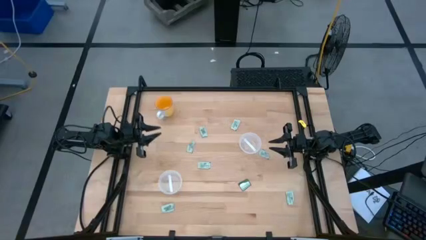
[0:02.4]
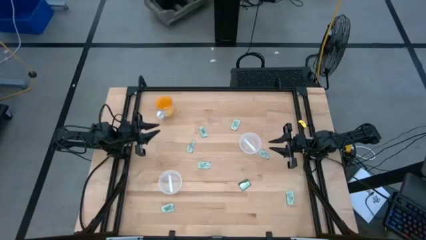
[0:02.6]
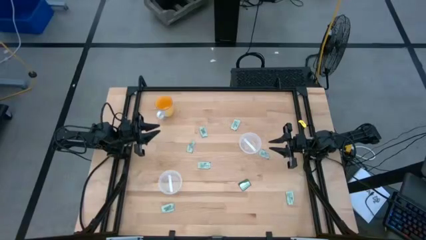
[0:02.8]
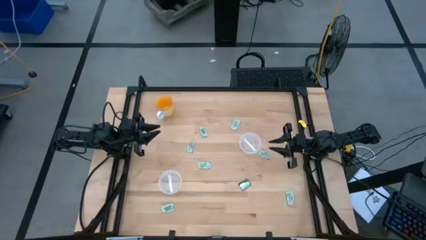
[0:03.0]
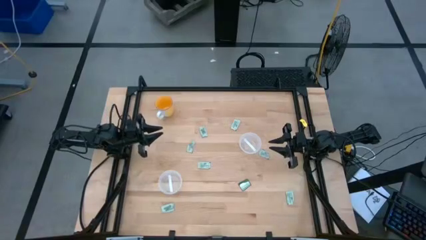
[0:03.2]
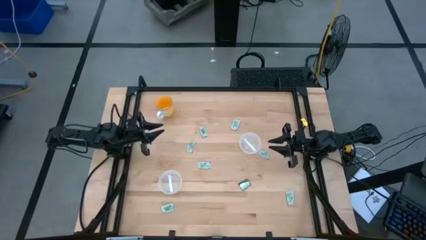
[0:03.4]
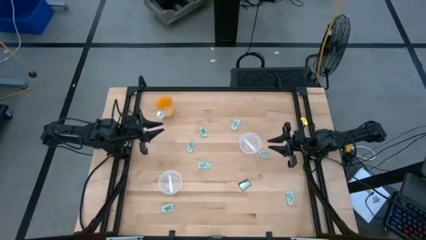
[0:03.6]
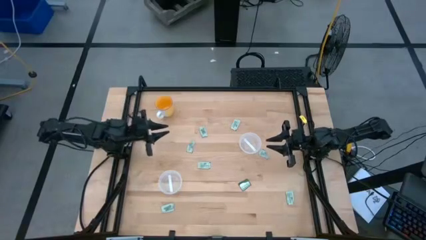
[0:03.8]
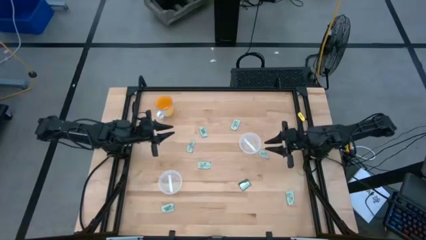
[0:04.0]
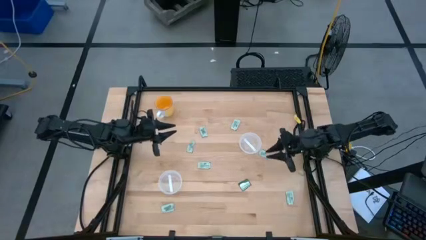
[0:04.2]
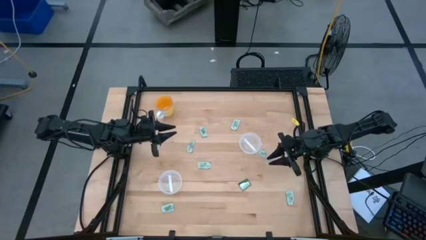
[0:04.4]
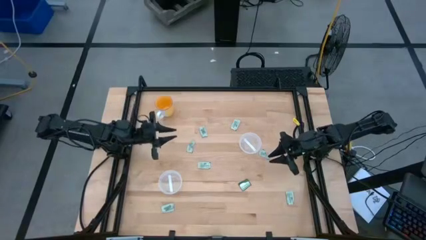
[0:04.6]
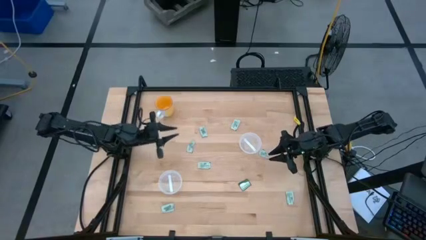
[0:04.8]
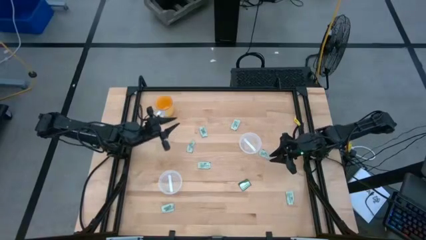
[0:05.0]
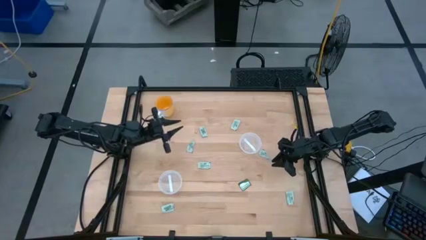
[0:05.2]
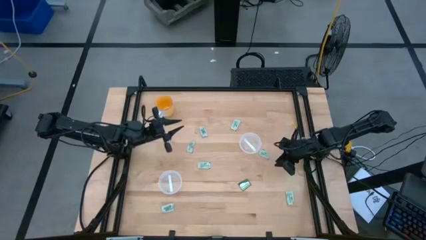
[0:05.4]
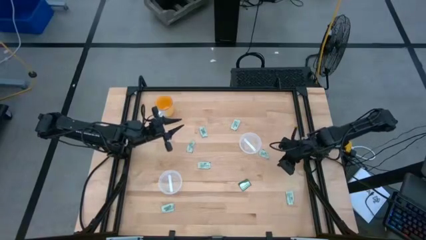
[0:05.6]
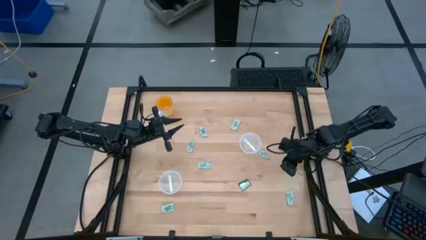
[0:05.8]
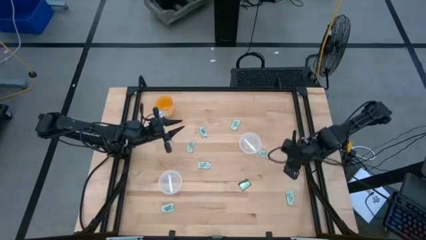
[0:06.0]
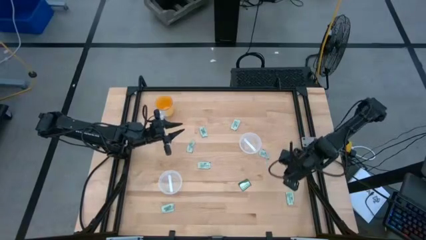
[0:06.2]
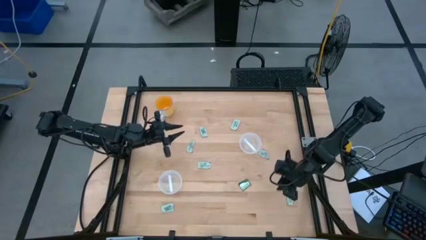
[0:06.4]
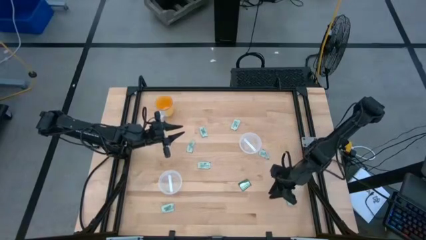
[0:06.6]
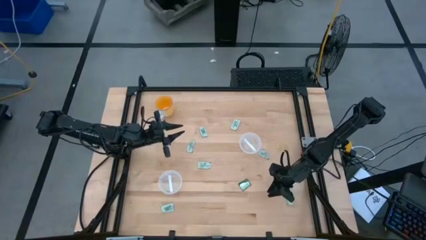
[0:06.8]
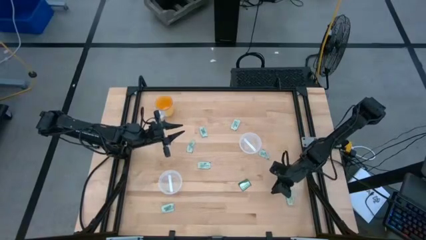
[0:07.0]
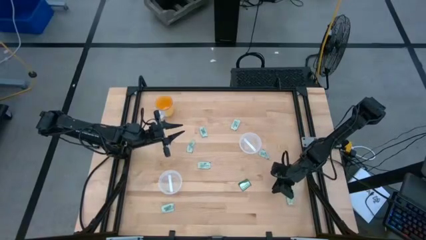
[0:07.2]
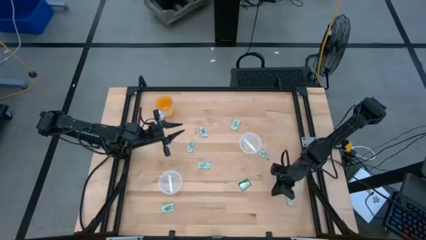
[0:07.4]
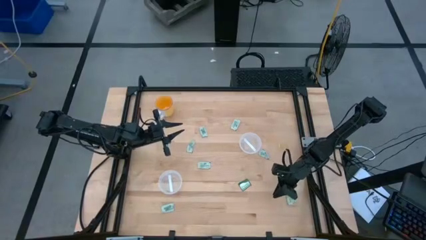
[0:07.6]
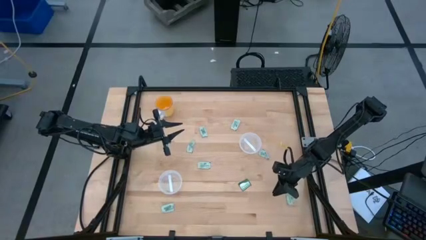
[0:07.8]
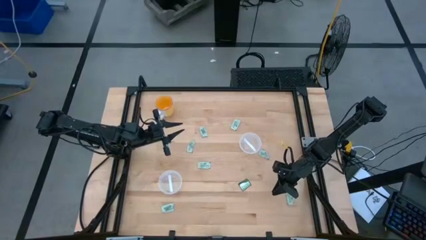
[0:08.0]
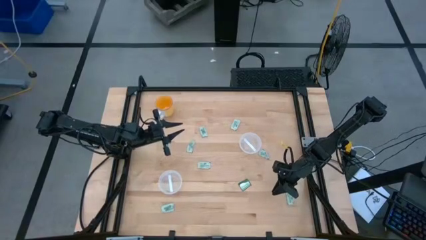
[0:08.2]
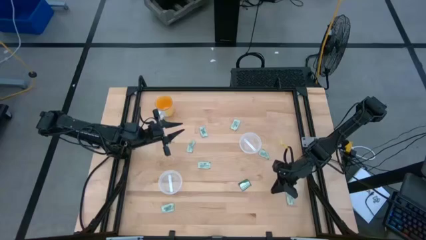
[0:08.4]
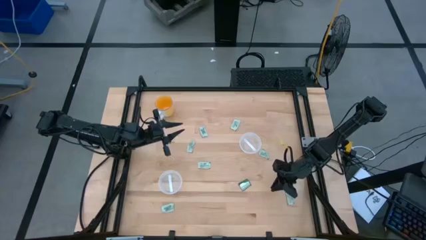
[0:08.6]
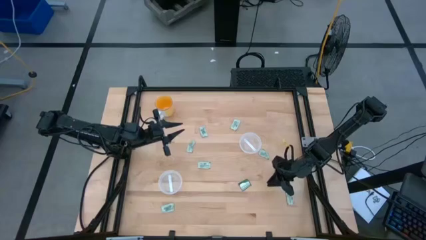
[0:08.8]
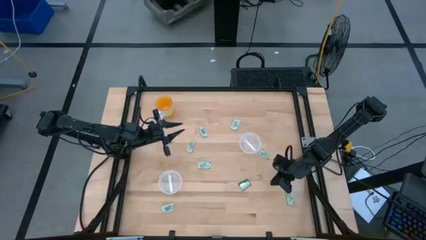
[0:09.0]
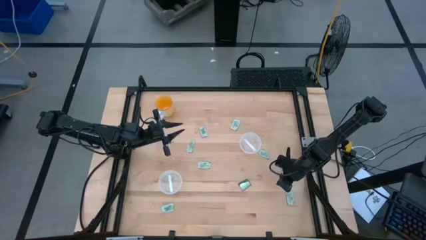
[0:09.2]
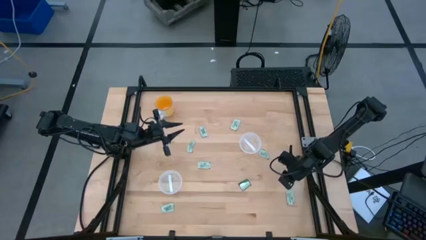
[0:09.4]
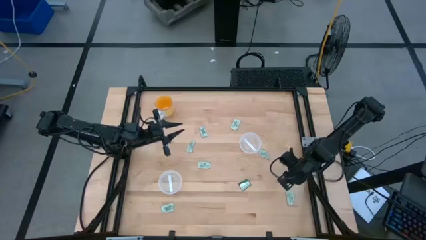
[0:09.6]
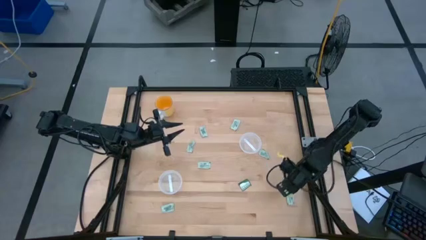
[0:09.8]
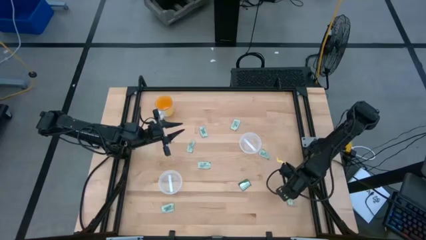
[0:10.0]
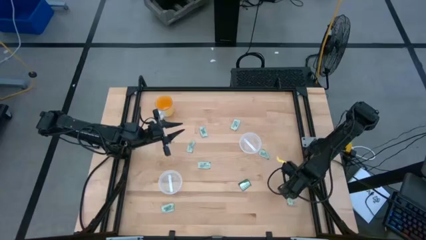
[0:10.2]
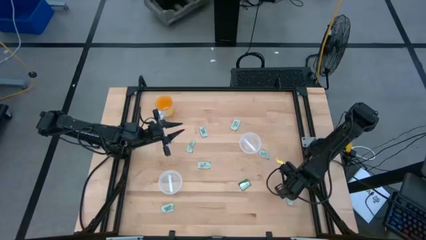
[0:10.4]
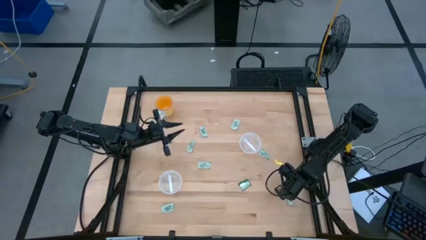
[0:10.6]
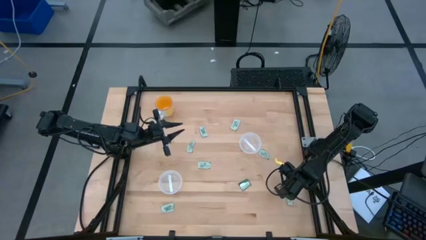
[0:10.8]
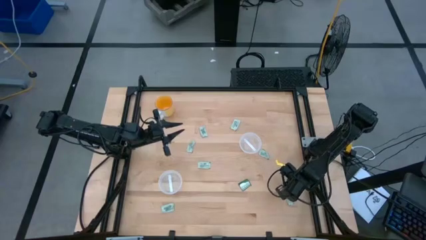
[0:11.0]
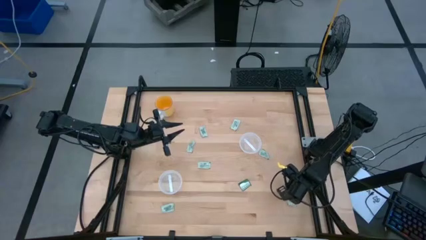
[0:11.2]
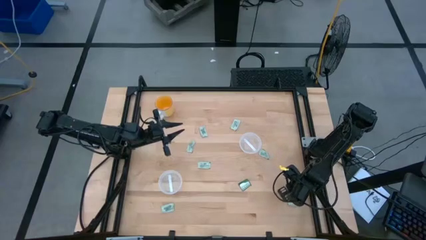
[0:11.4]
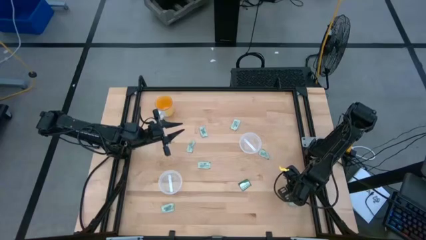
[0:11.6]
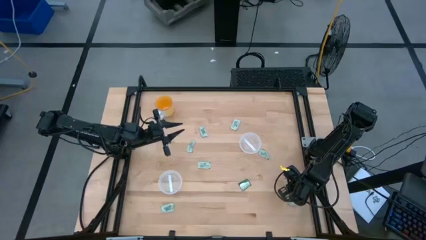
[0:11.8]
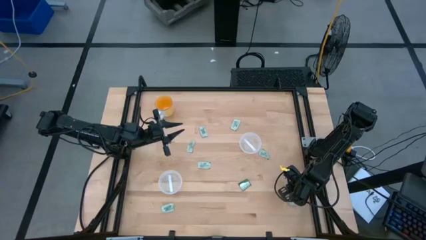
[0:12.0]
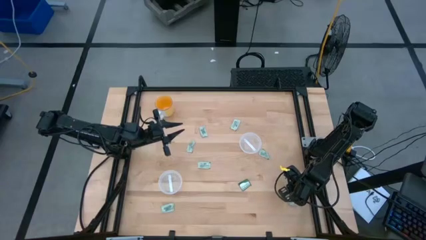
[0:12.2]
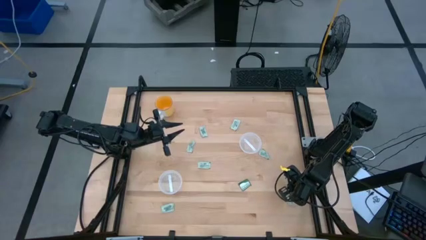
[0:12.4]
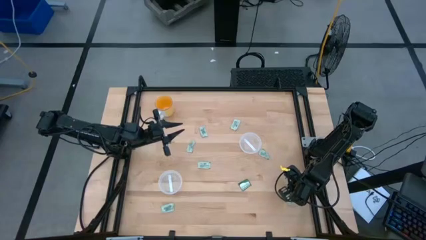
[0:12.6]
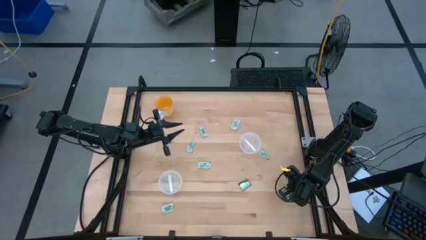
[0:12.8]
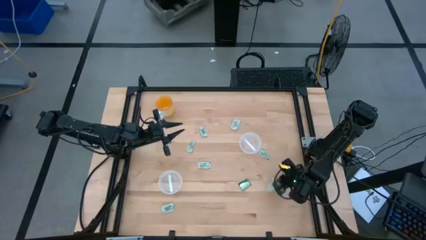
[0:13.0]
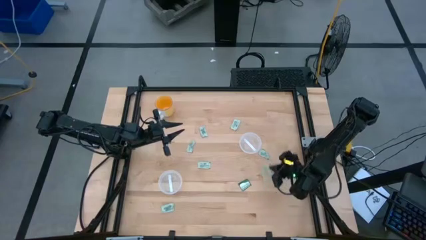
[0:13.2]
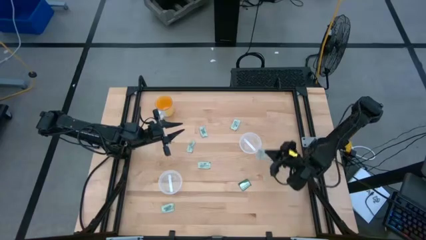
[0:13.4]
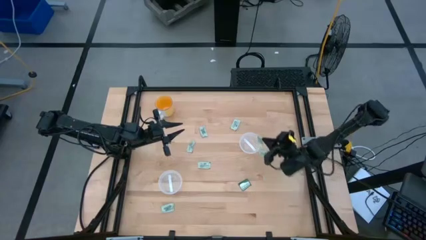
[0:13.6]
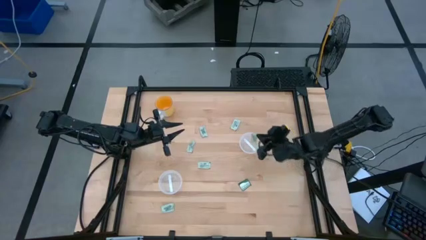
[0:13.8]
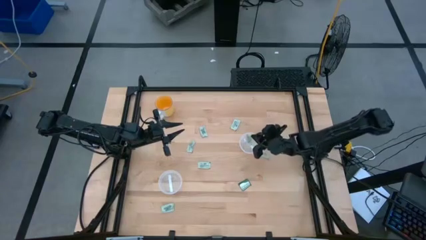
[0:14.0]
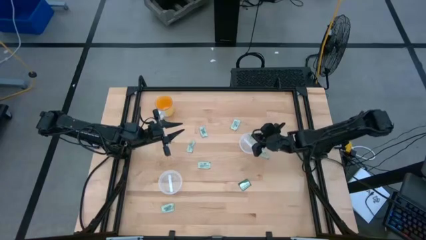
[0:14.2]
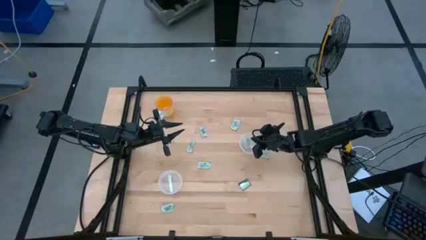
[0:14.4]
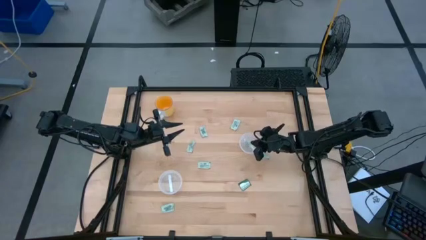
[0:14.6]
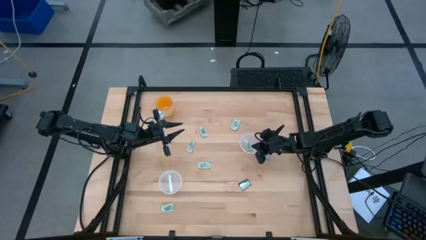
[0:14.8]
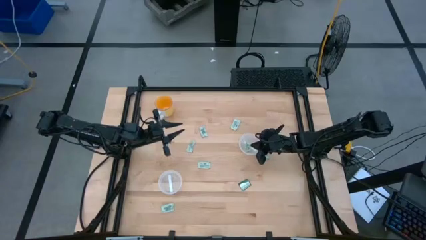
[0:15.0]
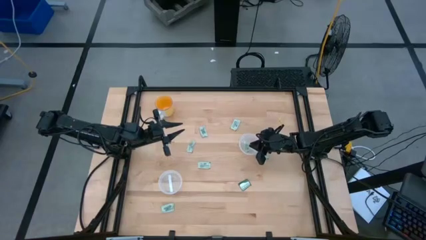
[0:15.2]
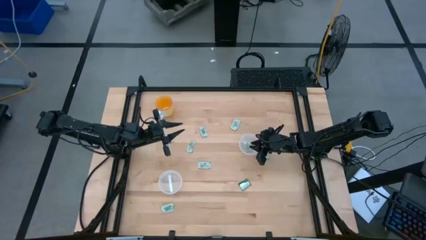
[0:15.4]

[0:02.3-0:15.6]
Task: Pick and place Stevia / Truvia into bins
Put the stevia packet into the right transparent container

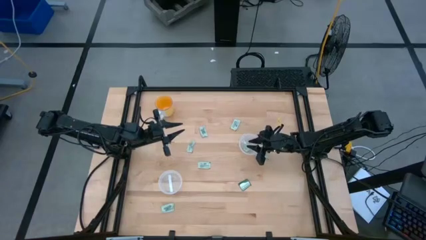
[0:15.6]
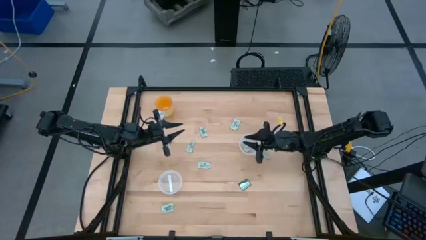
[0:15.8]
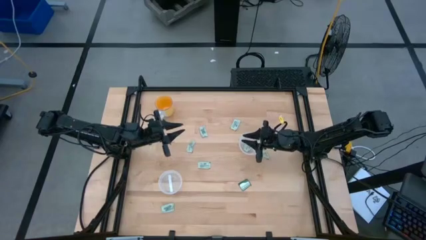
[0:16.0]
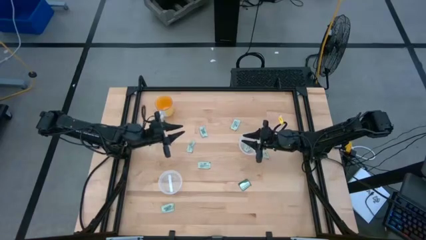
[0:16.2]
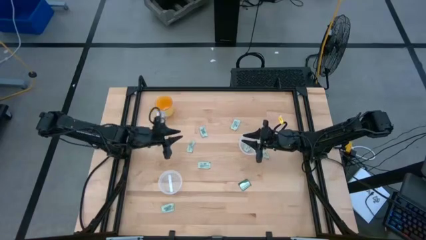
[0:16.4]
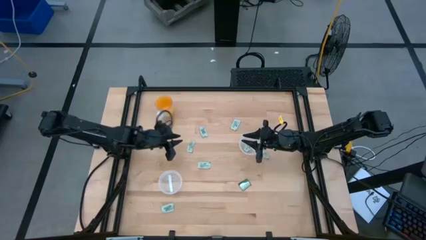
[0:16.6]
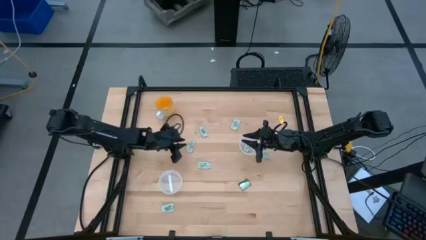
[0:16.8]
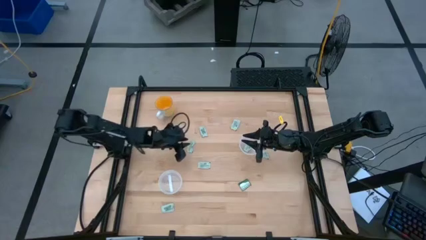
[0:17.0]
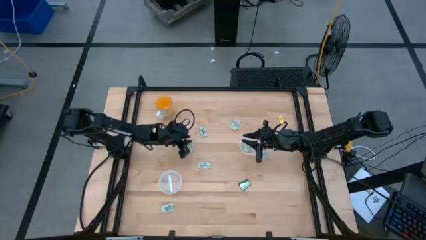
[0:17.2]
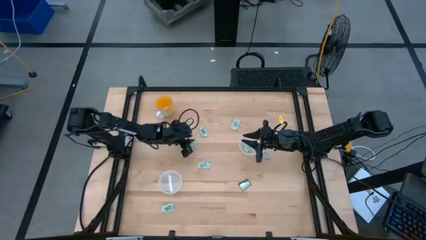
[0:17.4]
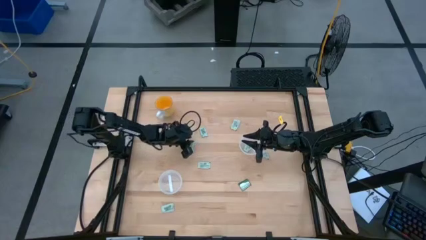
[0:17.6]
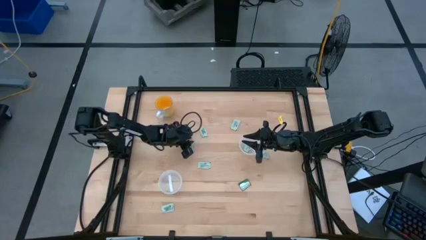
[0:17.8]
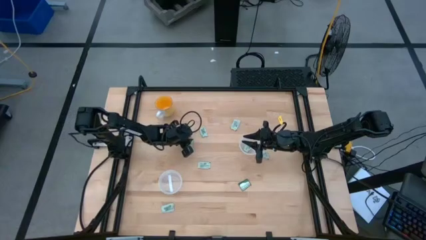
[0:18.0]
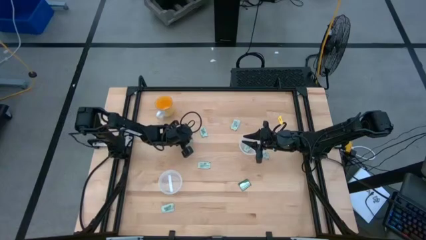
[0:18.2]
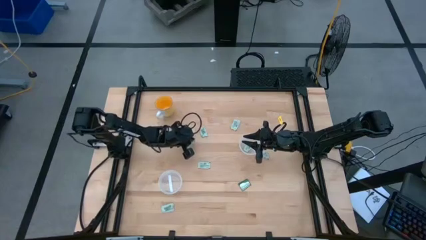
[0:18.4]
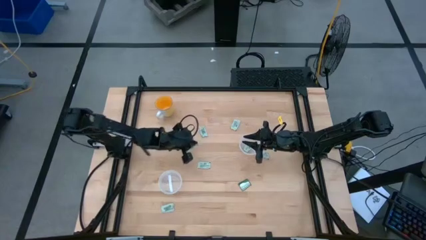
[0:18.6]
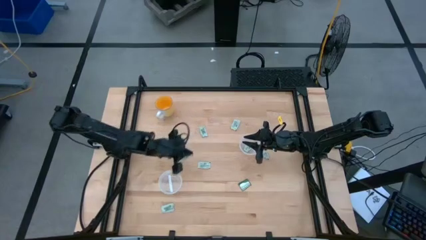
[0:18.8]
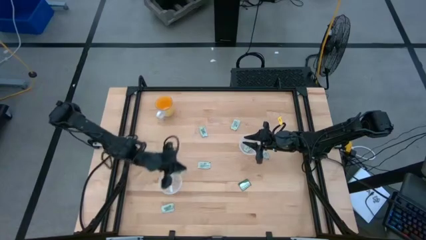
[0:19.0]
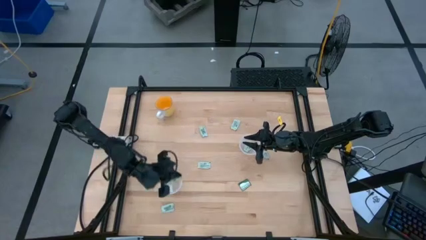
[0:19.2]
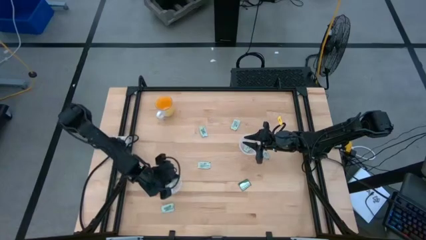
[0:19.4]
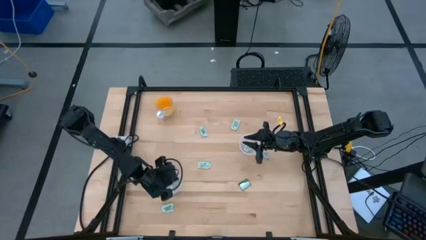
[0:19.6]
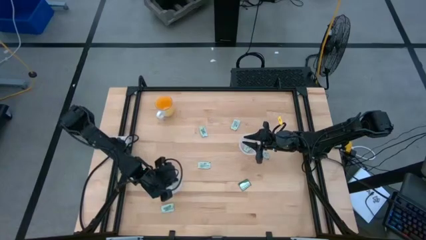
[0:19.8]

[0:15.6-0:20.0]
Put the stevia packet into the left transparent container
